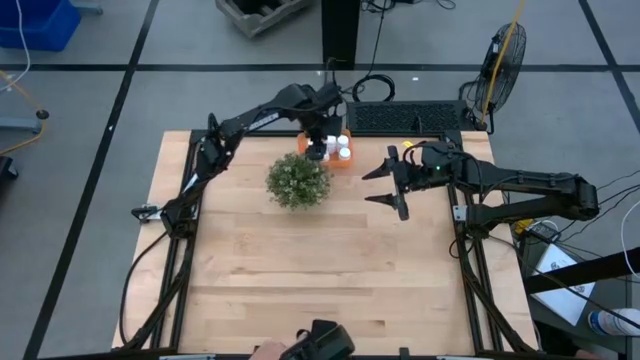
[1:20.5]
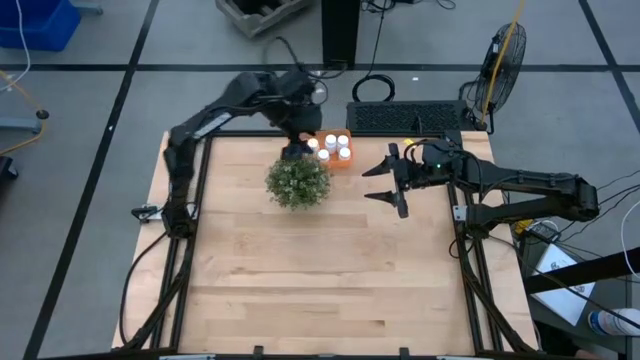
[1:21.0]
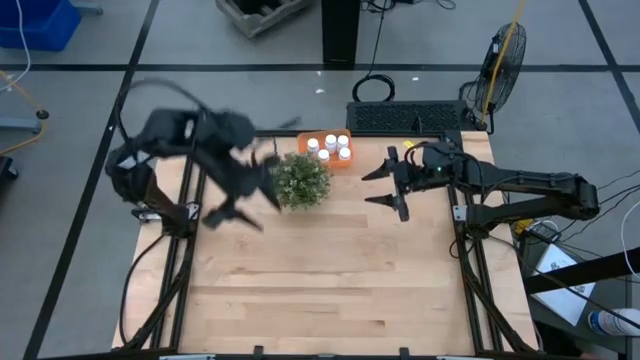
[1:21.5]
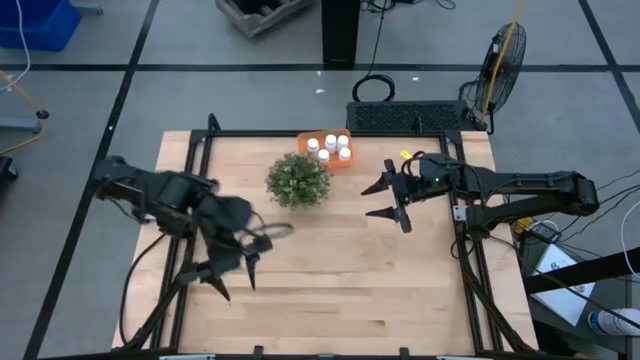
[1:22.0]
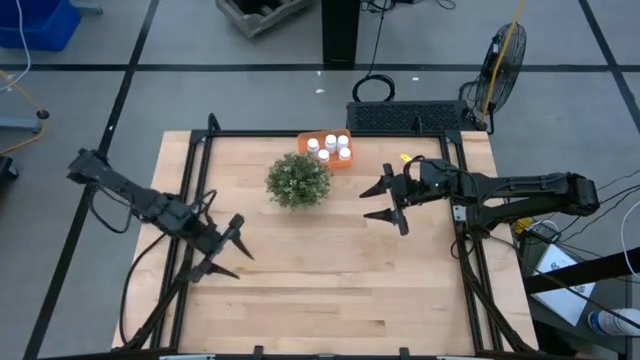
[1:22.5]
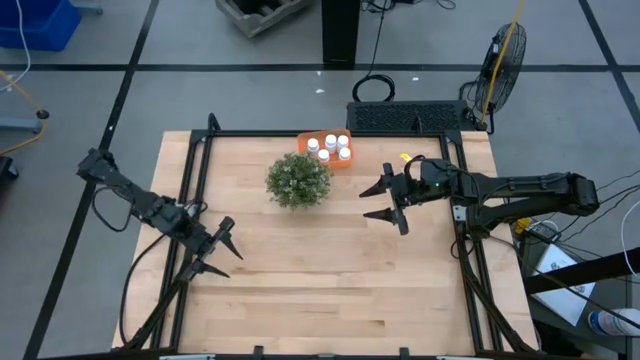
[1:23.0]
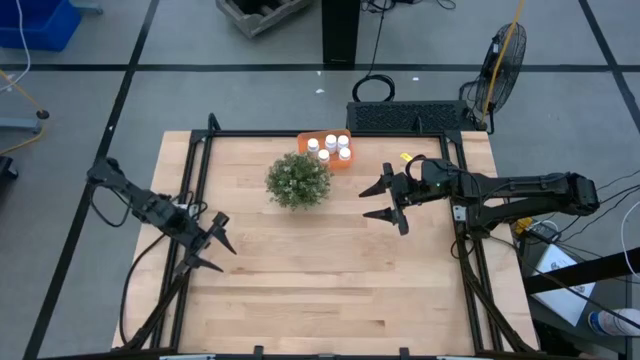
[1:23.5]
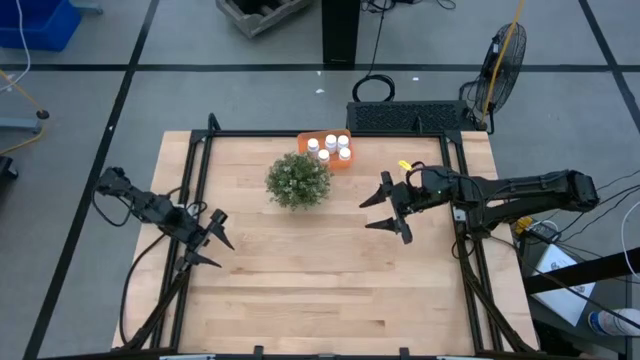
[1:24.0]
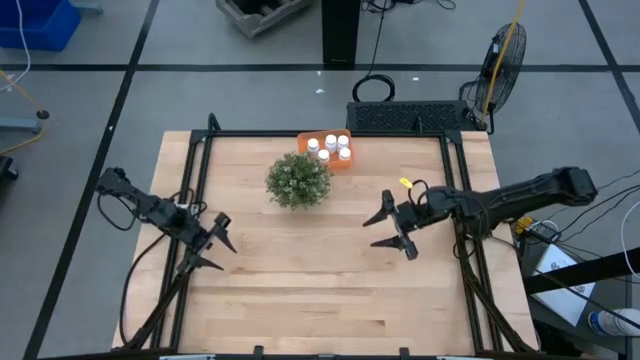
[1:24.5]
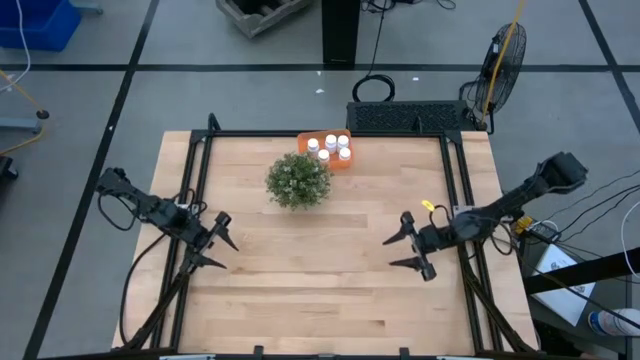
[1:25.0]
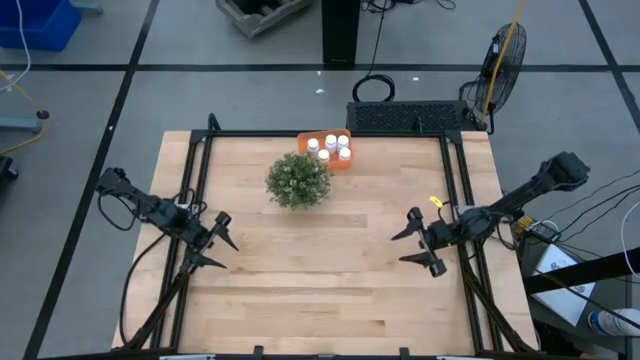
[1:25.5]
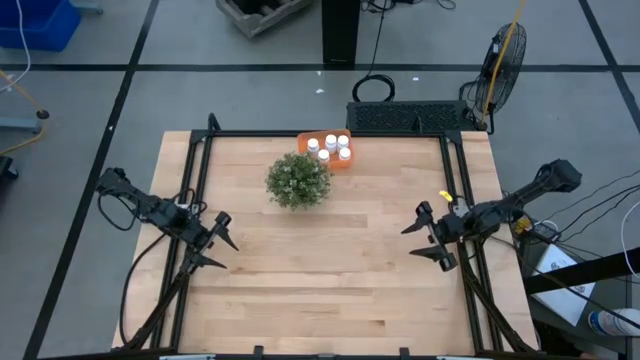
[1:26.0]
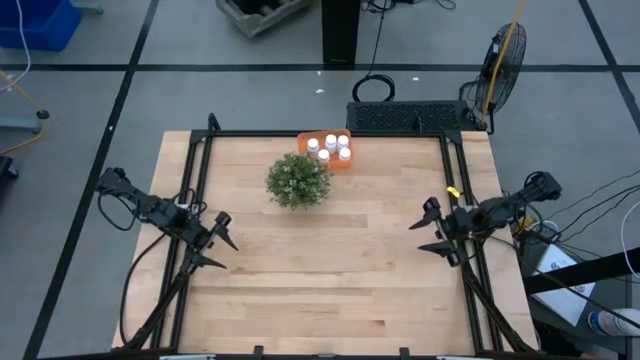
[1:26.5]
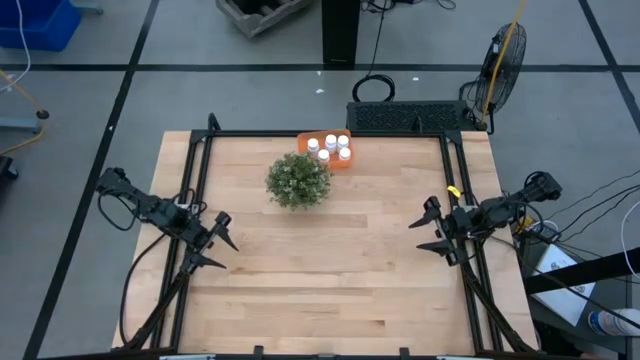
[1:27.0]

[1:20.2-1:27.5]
Task: Pick and place pill bottles into a basket
Return to Home Position

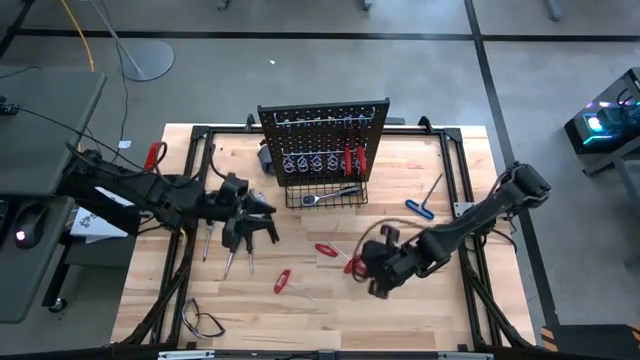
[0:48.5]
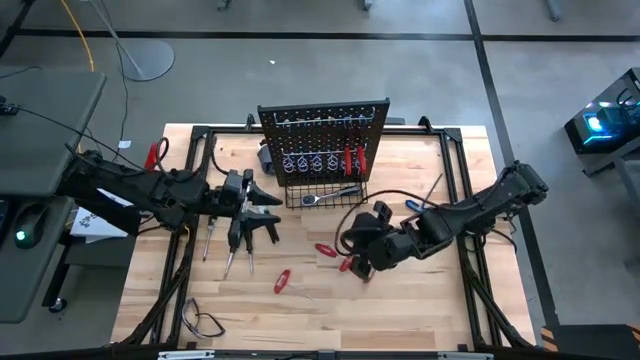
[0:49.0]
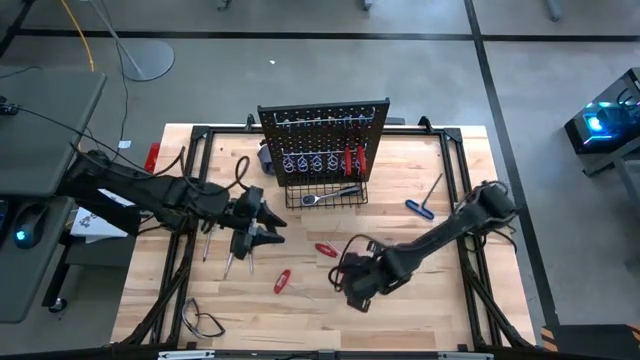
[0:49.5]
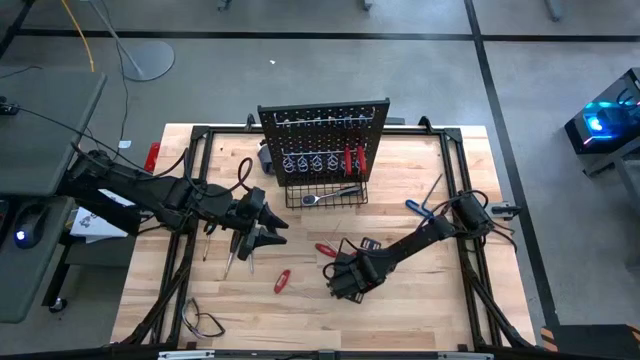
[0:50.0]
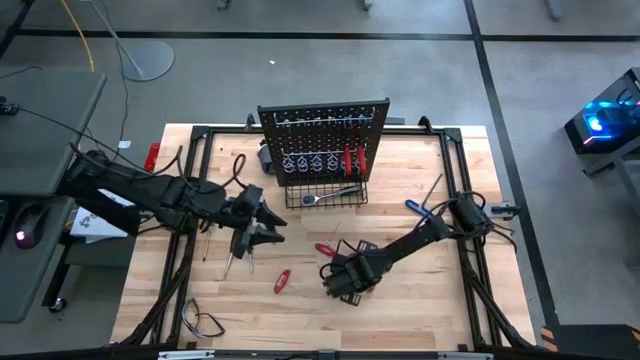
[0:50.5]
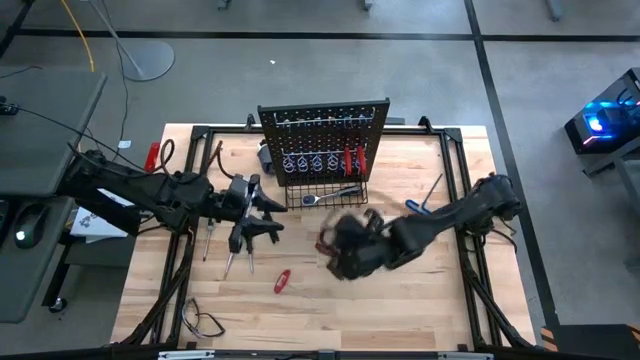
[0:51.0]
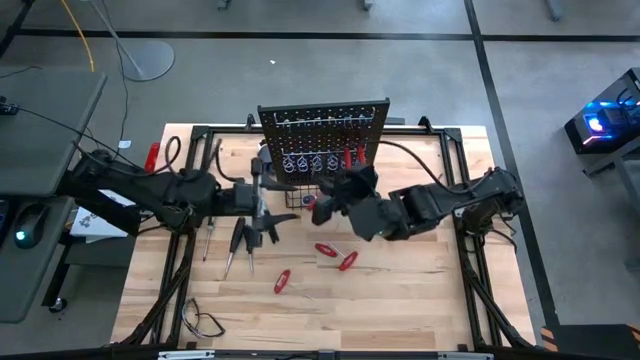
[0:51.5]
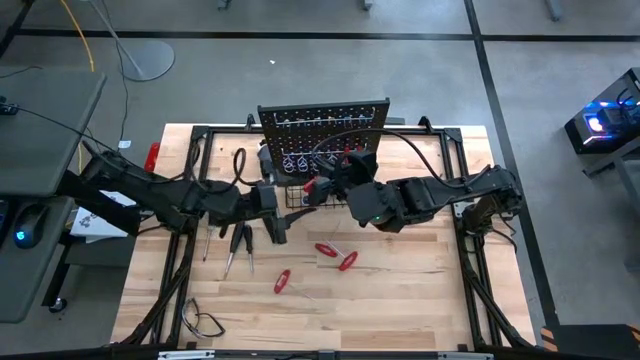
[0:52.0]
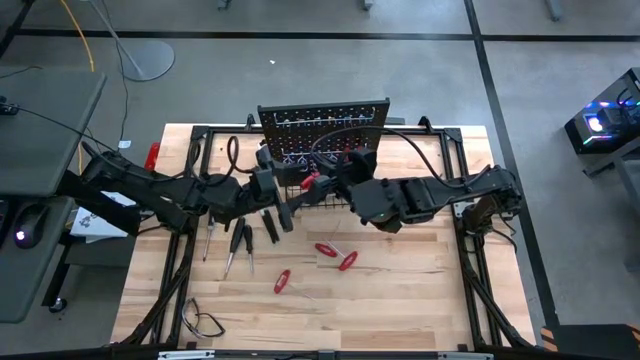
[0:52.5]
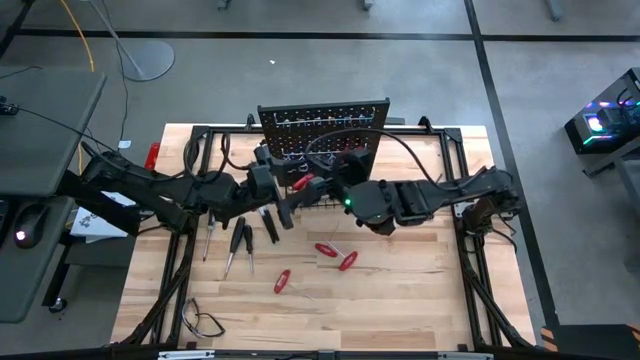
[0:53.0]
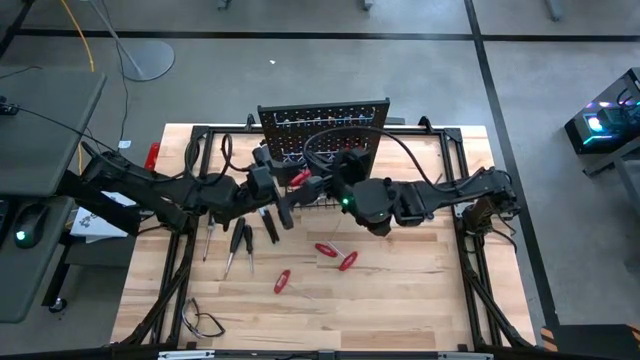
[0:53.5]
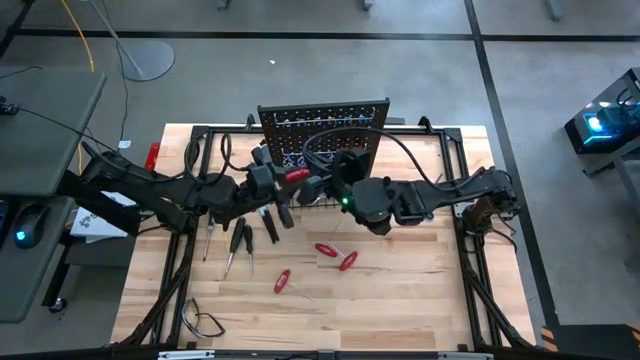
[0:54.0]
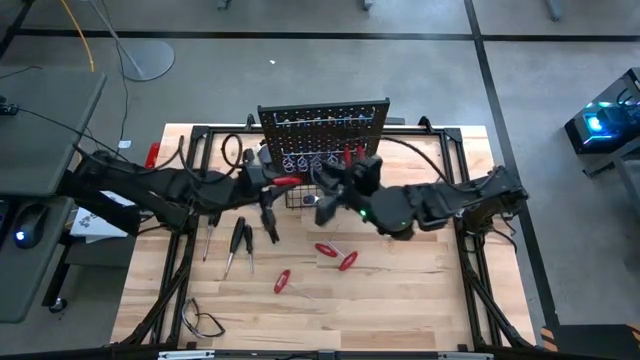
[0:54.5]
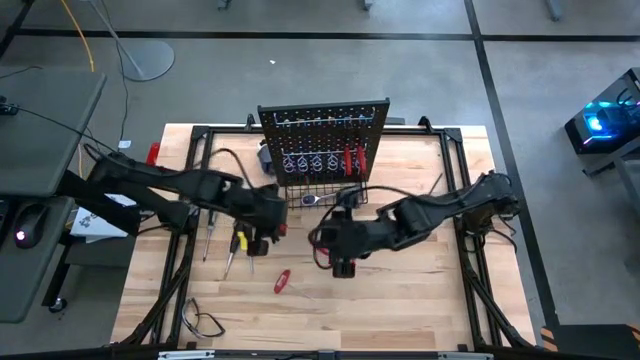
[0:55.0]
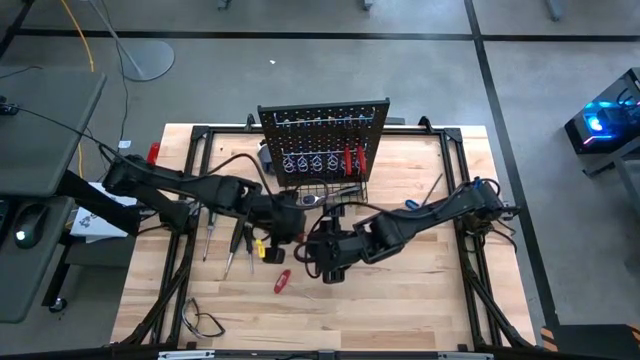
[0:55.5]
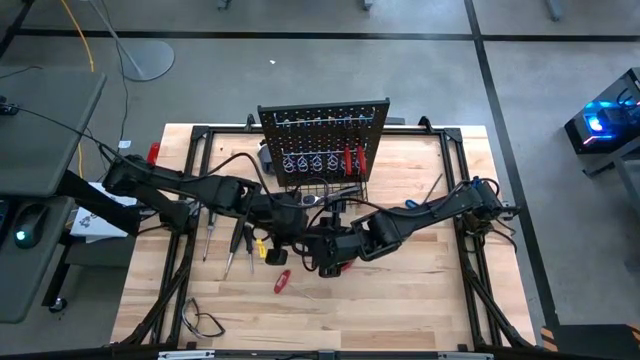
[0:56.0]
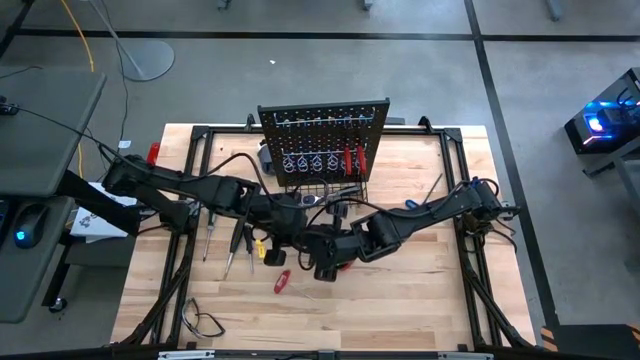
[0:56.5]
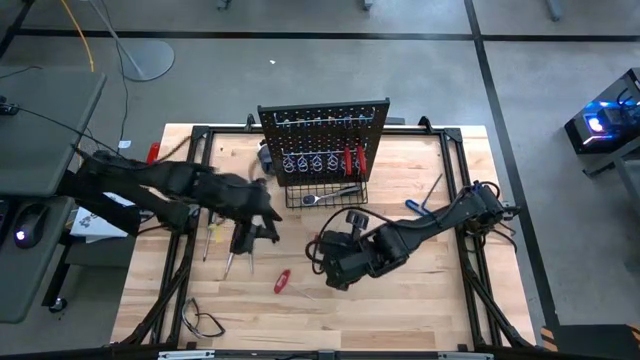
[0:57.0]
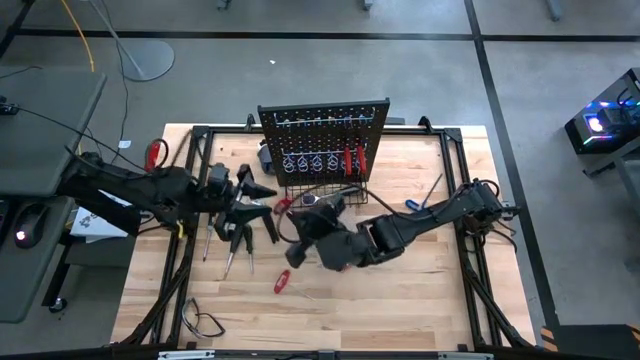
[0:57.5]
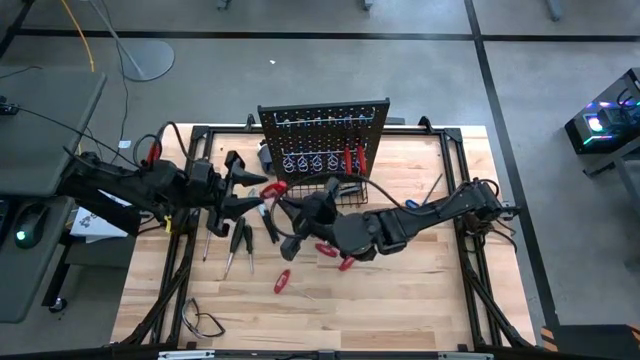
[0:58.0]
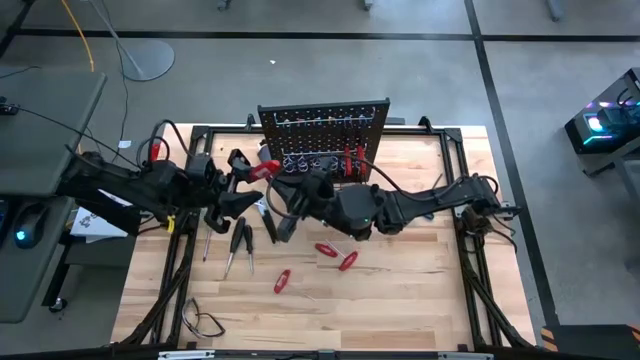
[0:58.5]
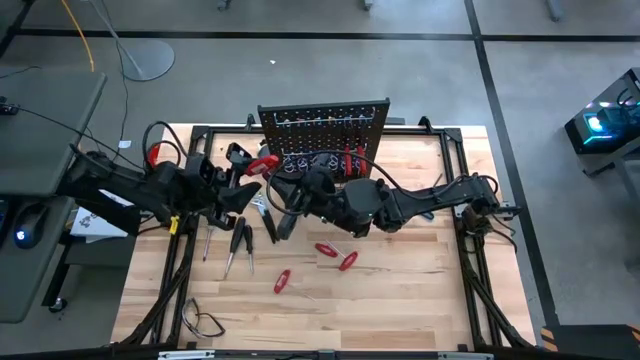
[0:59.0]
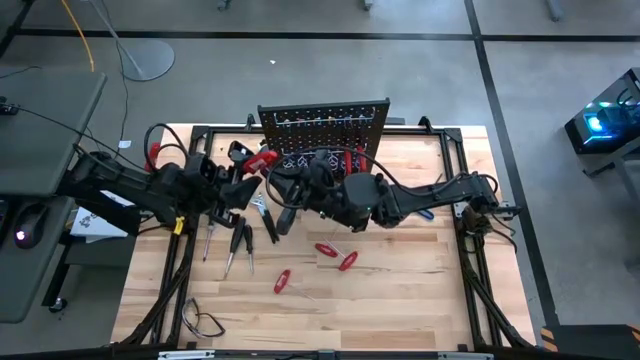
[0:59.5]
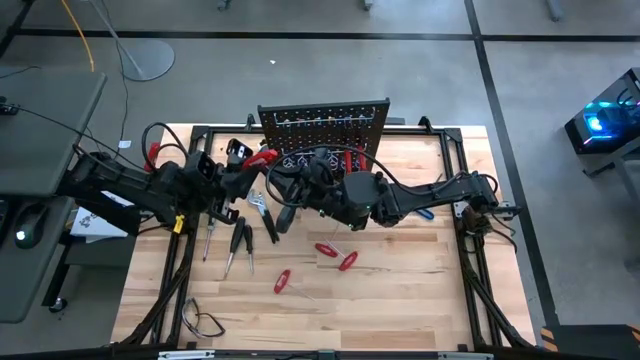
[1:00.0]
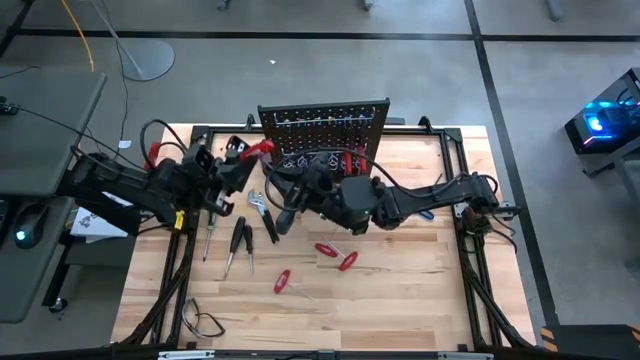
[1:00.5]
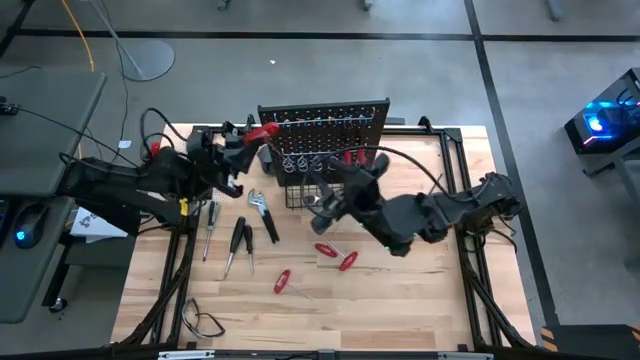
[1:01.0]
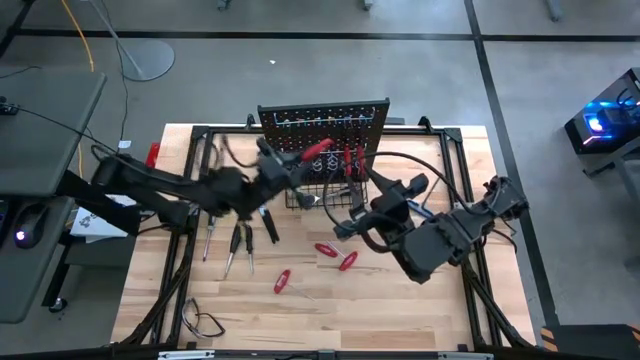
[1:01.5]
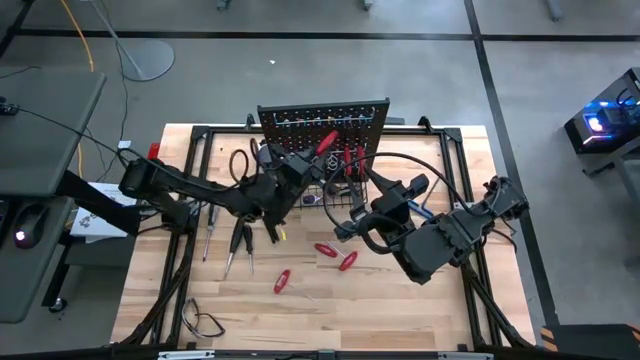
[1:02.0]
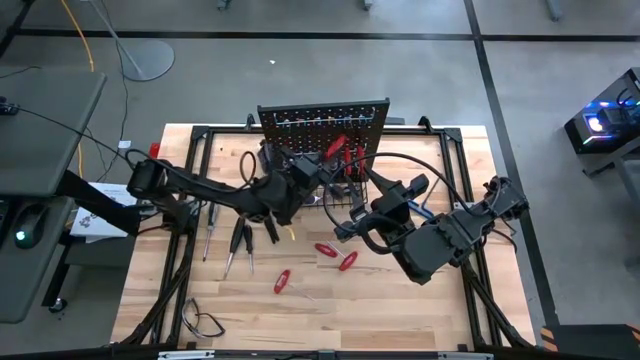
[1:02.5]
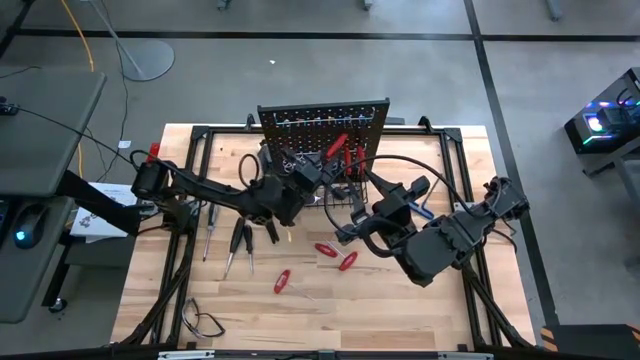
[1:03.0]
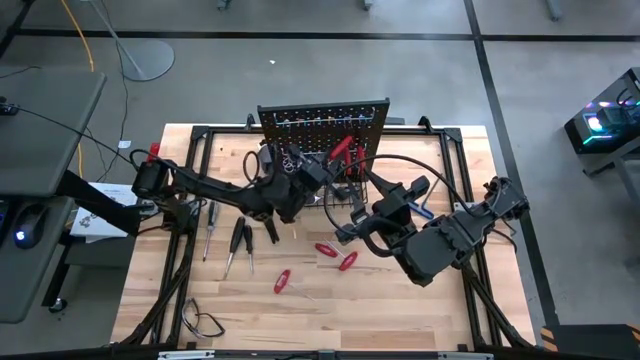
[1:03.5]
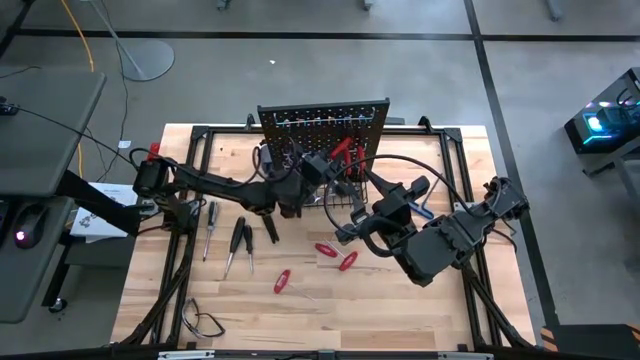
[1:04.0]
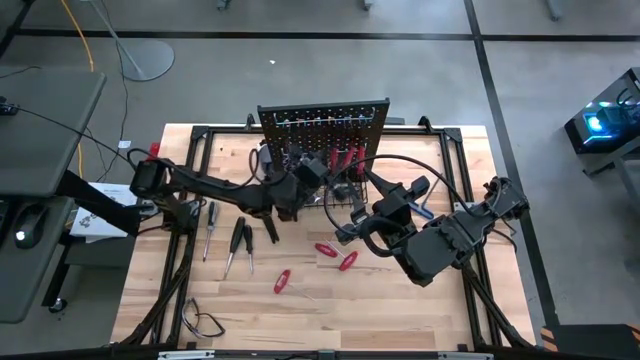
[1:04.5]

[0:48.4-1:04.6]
Task: Hang tools onto peg board
Hang the red allen wrench on the peg board
